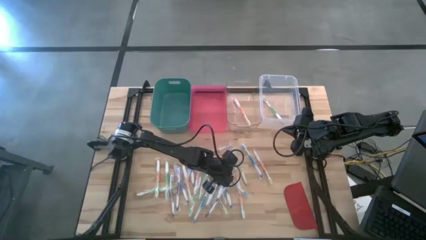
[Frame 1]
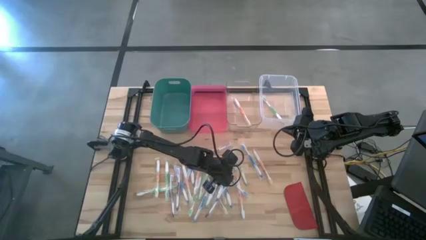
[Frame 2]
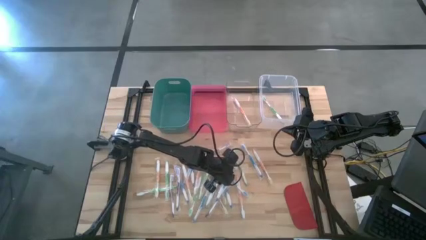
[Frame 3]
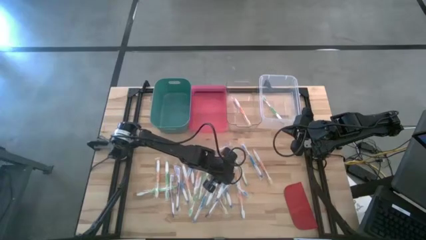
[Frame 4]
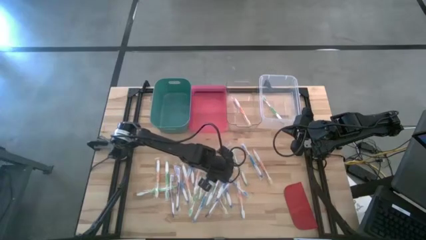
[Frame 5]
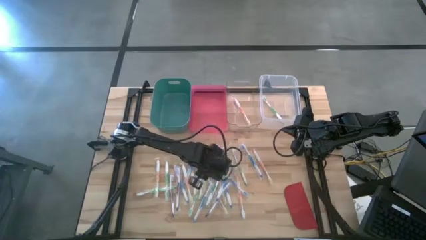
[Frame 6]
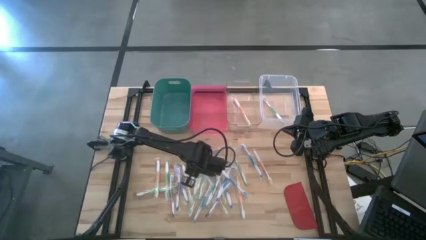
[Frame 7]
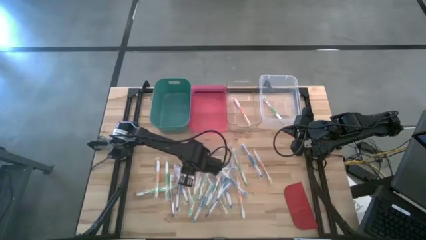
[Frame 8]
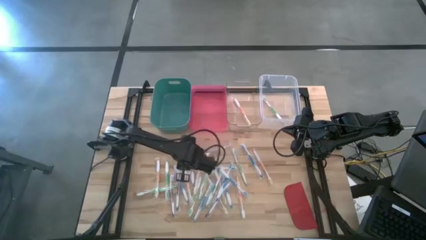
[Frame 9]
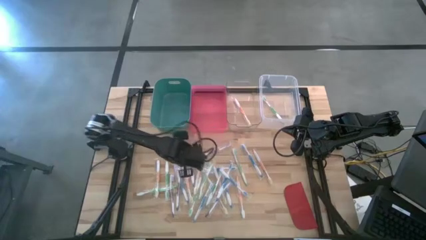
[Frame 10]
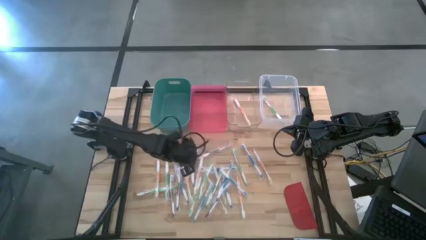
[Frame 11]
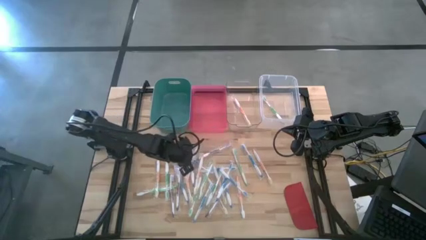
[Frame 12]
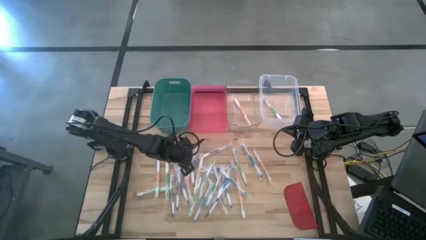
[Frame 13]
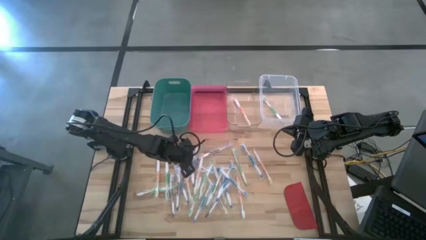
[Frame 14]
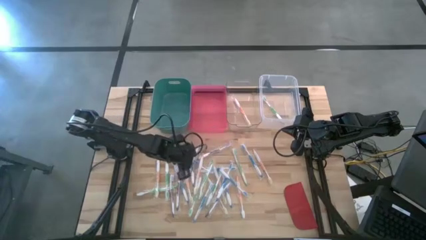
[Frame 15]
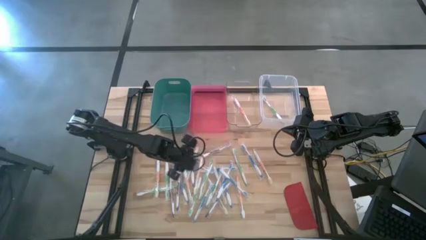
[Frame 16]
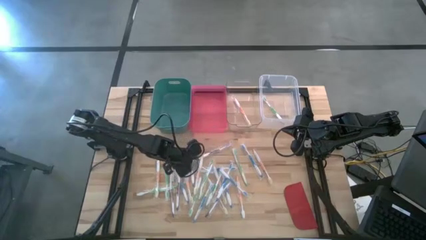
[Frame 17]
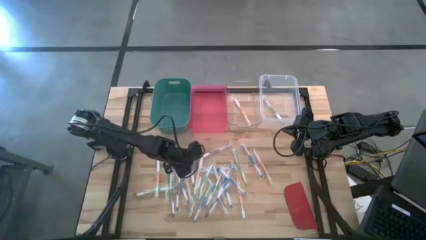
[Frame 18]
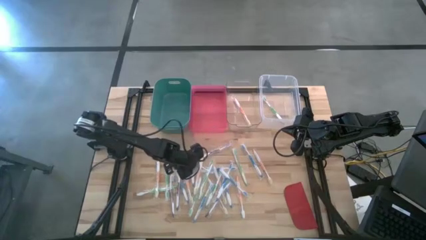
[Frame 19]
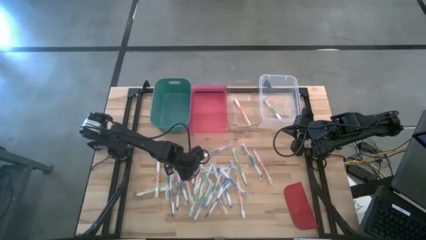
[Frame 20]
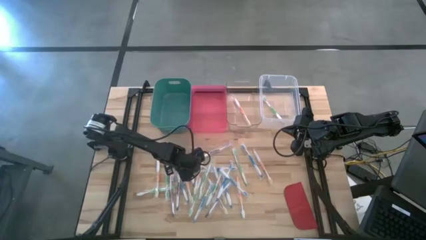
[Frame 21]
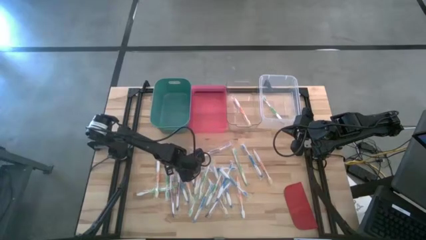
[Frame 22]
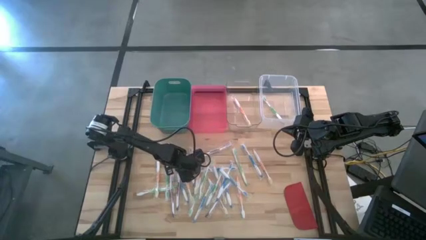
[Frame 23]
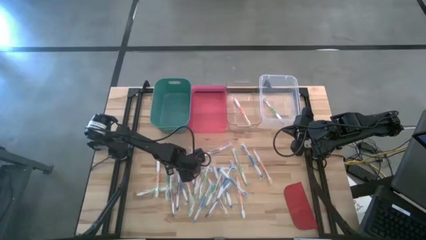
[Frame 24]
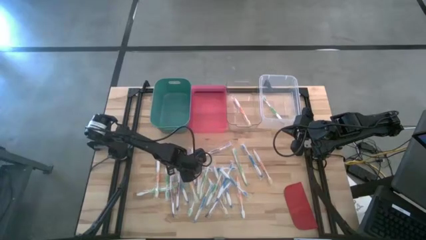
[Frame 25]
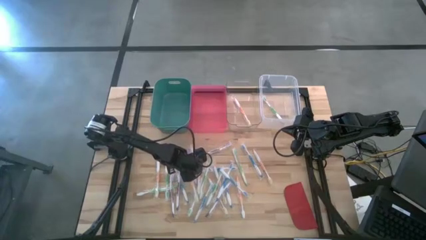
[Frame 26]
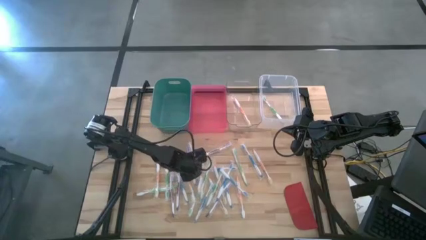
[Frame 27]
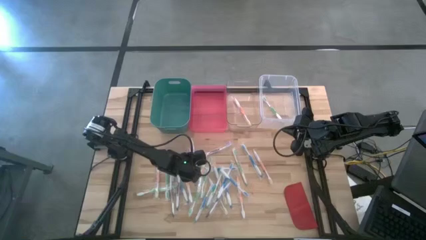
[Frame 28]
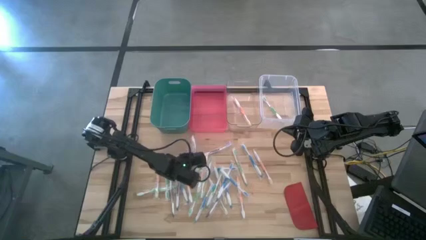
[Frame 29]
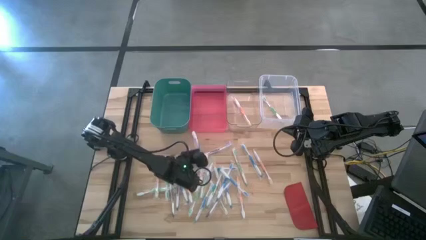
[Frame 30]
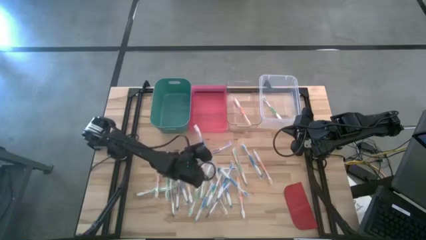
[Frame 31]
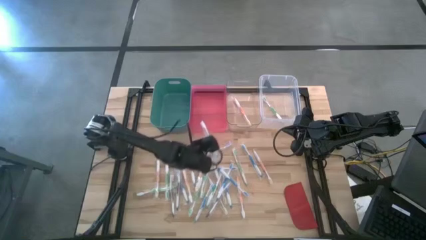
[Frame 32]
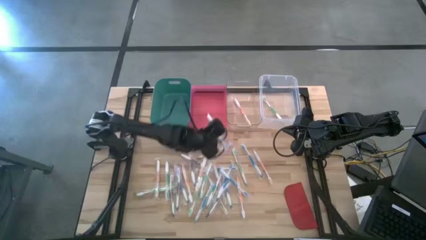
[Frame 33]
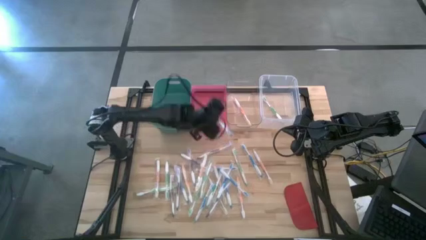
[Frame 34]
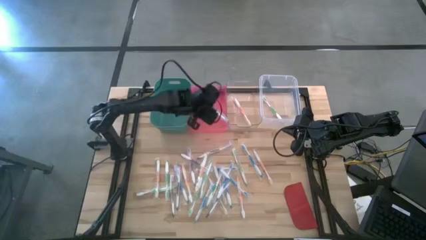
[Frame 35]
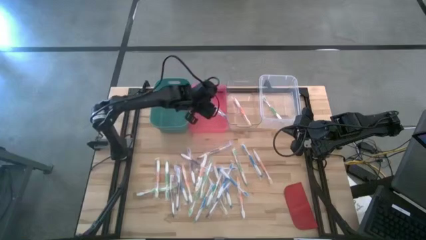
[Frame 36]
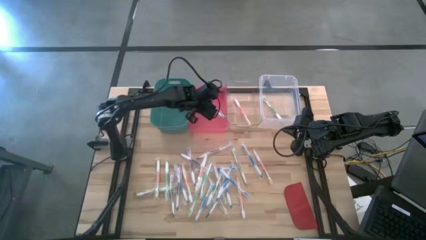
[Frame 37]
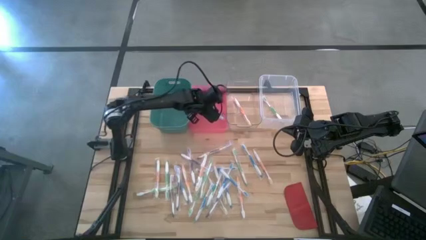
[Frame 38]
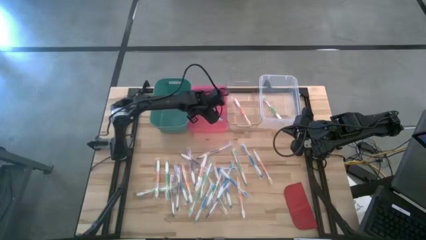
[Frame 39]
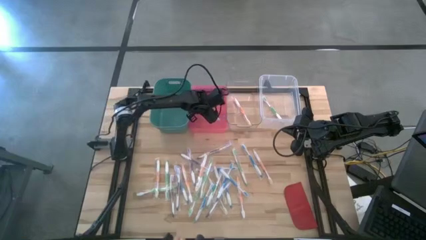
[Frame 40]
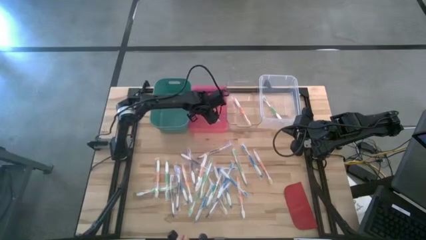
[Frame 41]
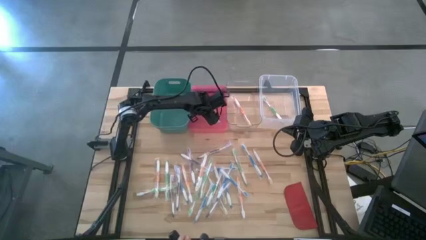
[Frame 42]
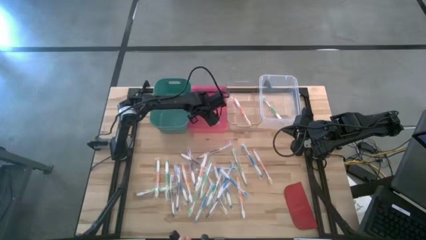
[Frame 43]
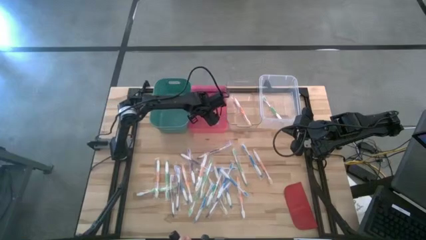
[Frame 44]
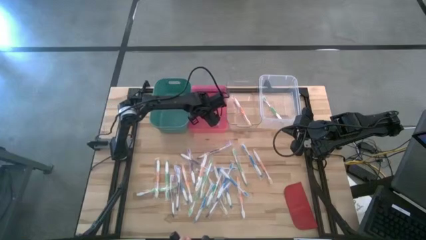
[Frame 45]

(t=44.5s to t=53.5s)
Task: Pick & Place Toothbrushes
Put the blue toothbrush into the red bin

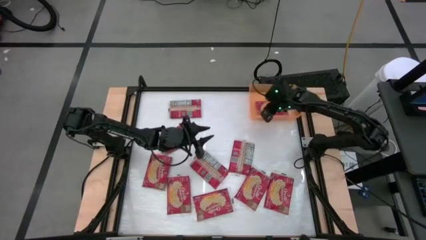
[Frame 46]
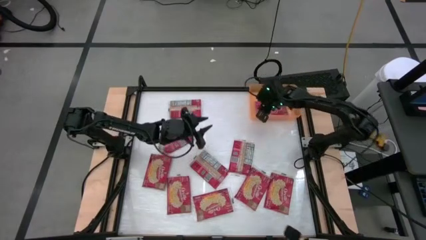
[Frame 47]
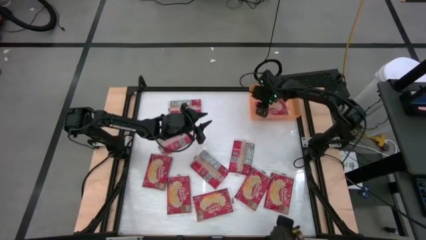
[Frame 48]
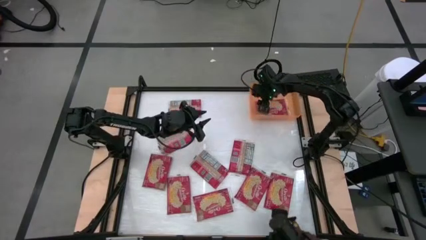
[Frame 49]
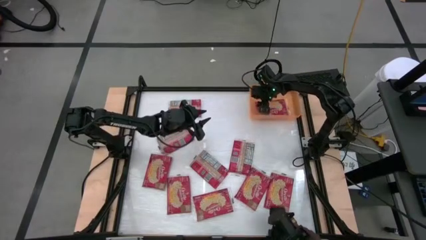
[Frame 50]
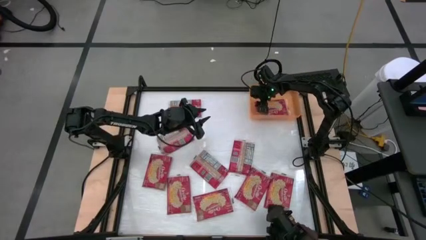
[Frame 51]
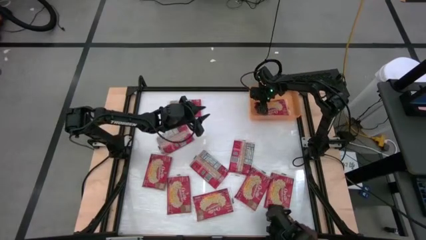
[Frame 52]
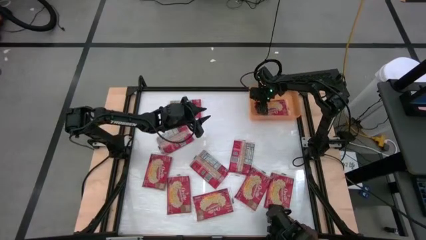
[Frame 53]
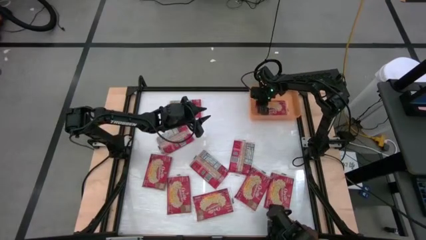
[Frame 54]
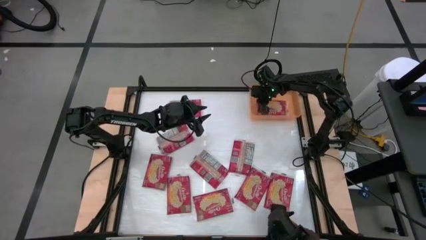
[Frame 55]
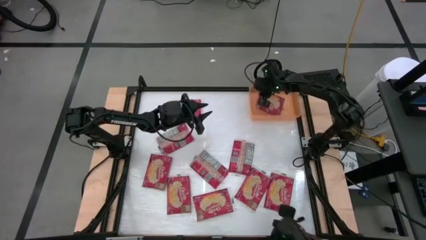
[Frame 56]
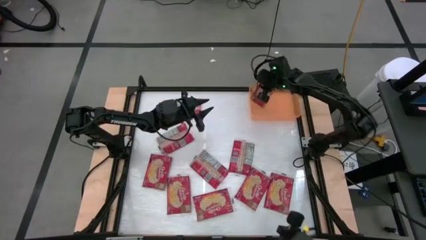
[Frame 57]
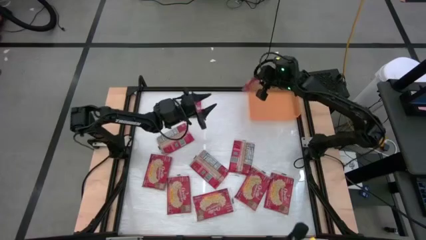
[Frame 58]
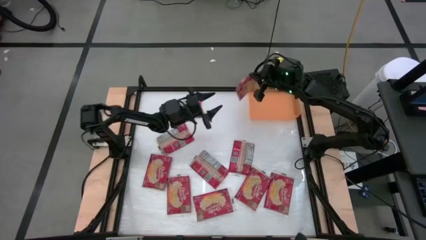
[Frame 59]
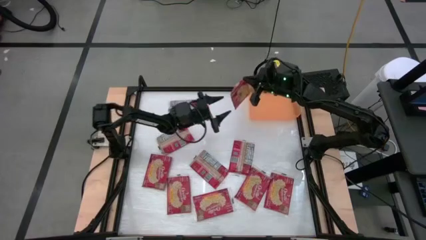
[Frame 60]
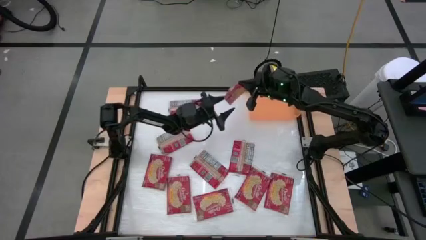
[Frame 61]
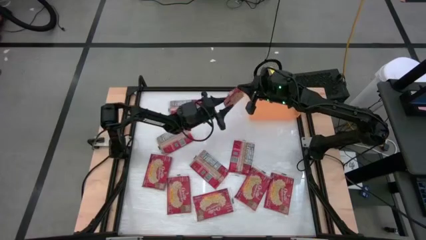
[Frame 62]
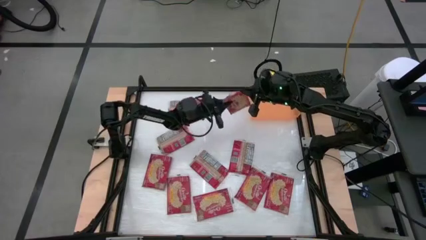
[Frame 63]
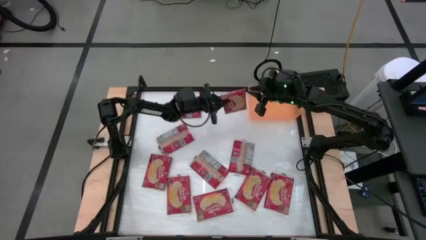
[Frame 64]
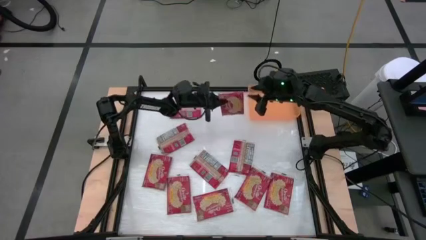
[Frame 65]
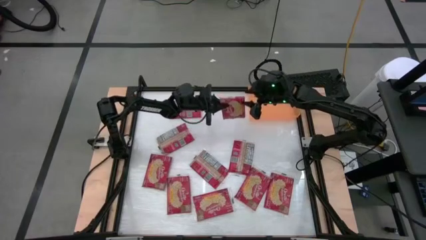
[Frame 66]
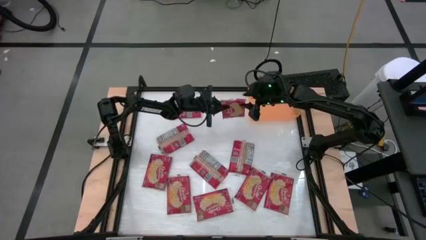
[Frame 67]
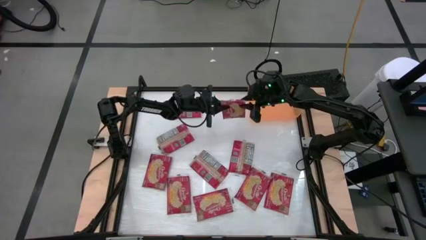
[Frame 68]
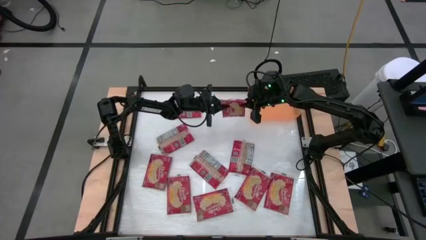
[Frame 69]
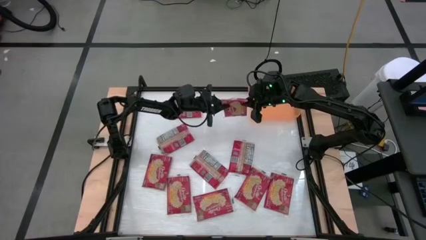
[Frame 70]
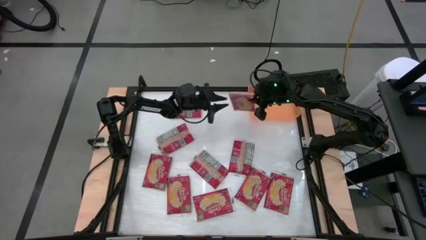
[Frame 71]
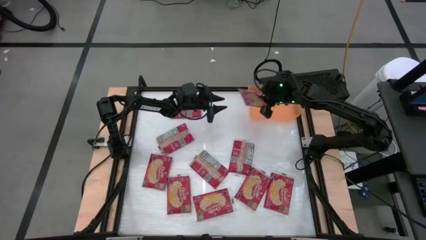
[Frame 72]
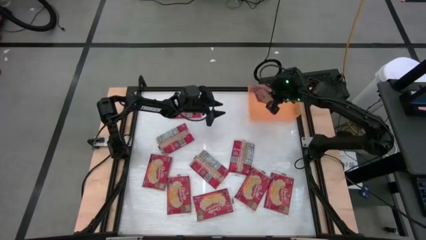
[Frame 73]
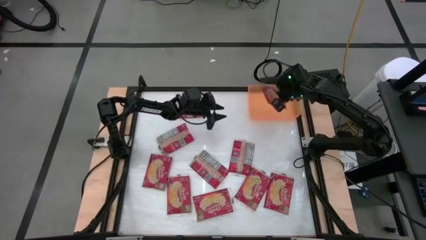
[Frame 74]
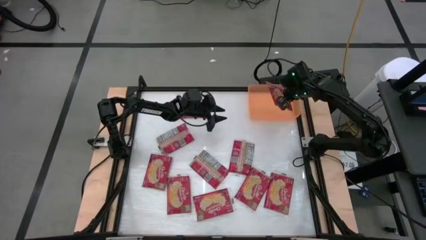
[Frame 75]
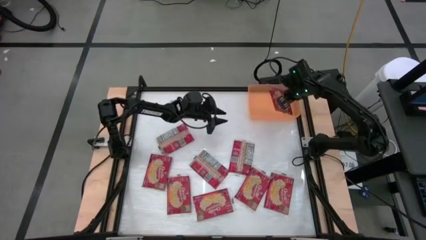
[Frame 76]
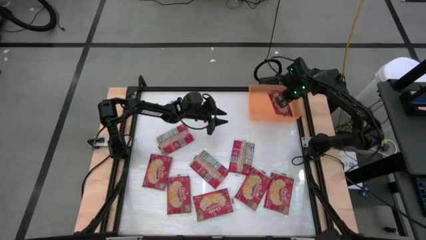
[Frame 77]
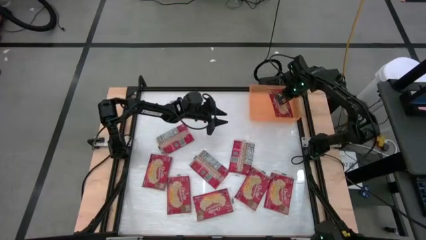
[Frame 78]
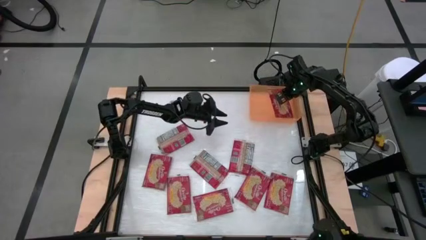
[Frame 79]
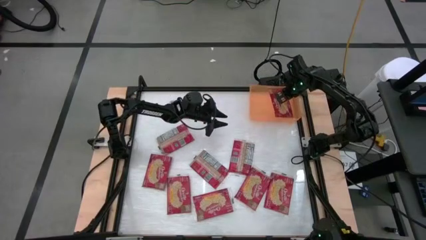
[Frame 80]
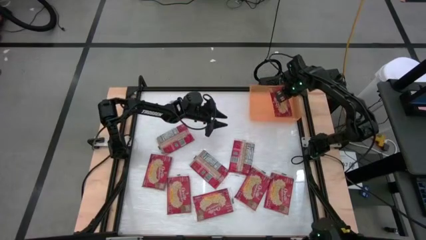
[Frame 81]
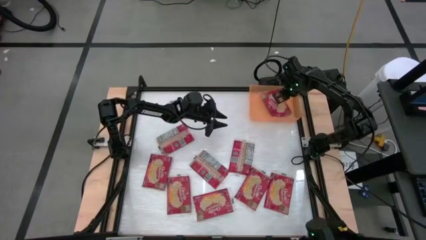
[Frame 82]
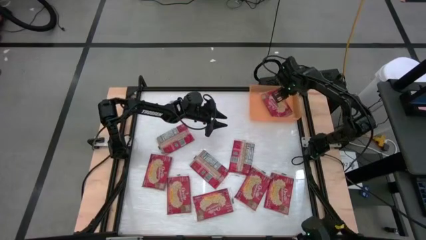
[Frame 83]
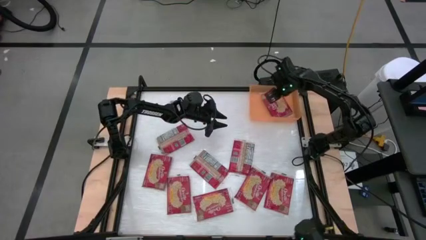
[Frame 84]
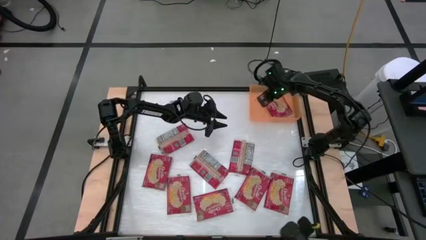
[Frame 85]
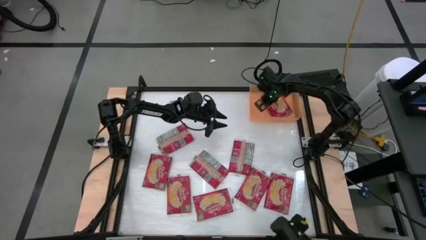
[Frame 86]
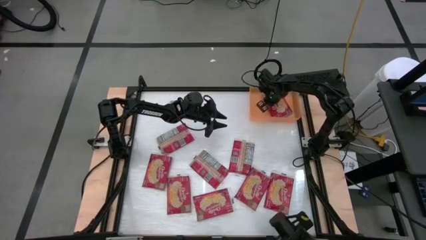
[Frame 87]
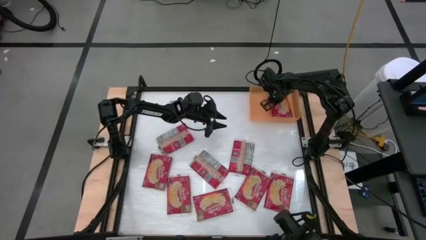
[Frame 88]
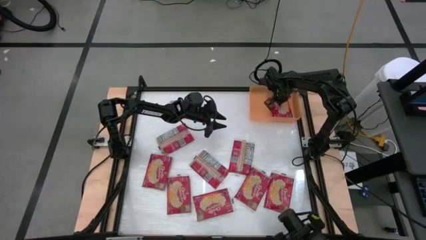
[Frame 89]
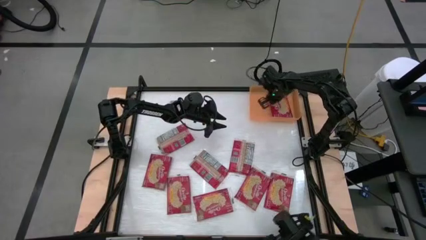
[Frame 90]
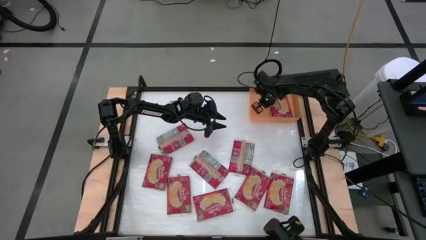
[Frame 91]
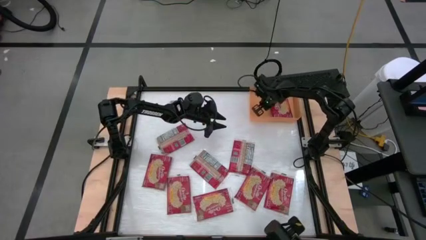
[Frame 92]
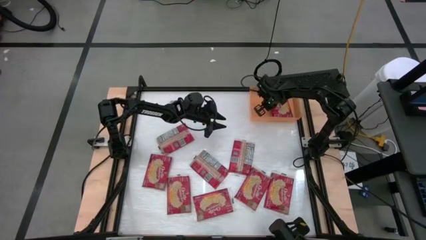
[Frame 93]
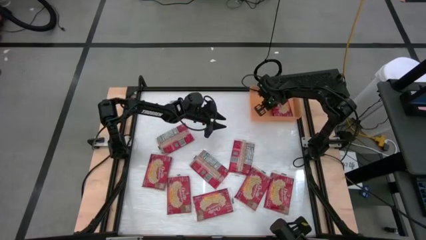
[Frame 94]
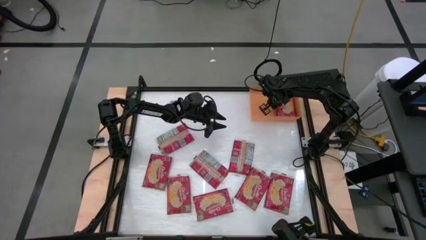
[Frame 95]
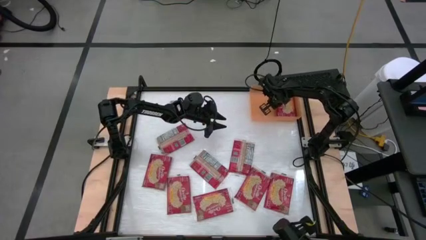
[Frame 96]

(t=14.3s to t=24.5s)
Task: Sort popcorn bags into baskets
Put the red popcorn bag into the orange bin
